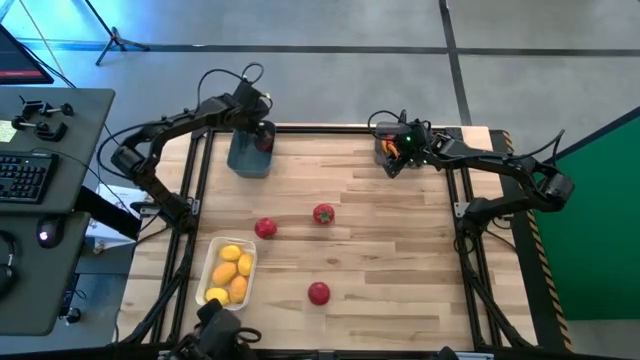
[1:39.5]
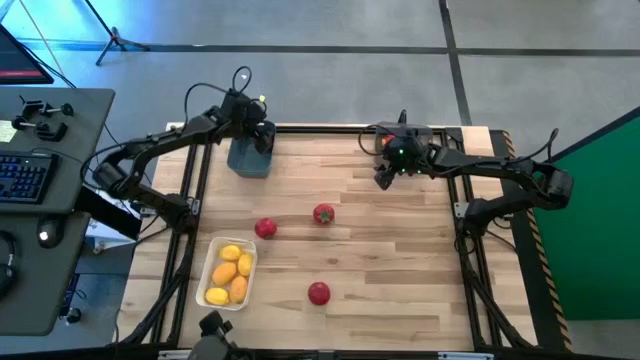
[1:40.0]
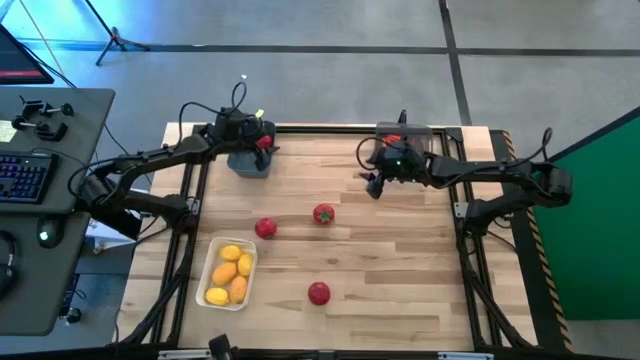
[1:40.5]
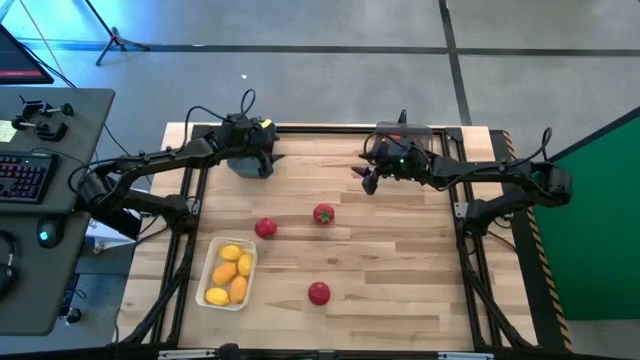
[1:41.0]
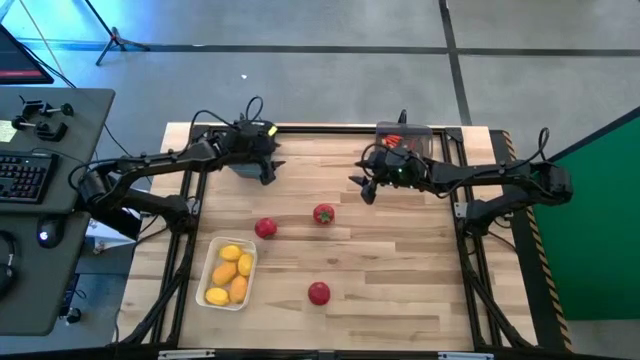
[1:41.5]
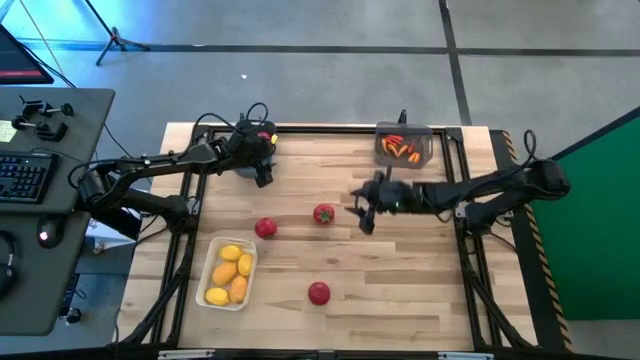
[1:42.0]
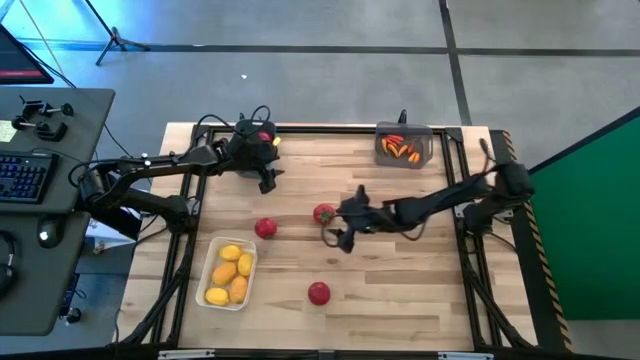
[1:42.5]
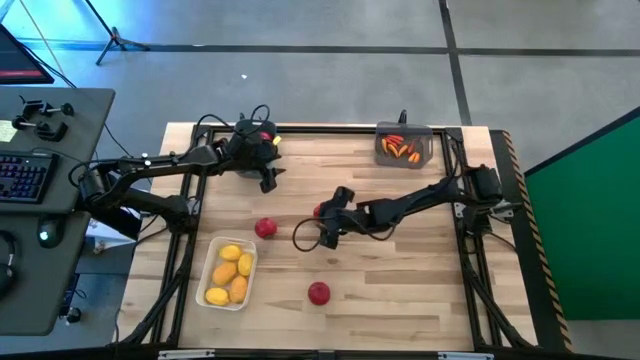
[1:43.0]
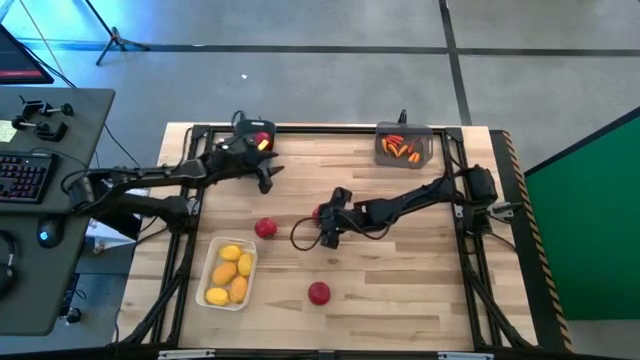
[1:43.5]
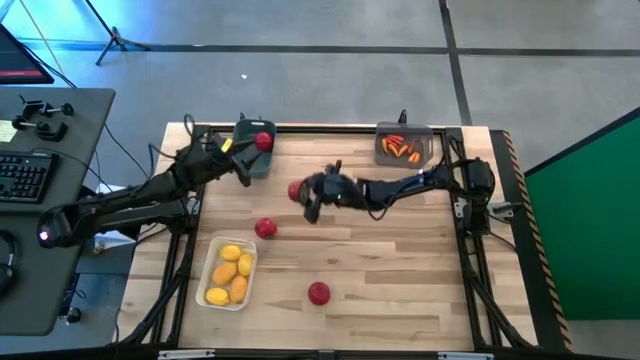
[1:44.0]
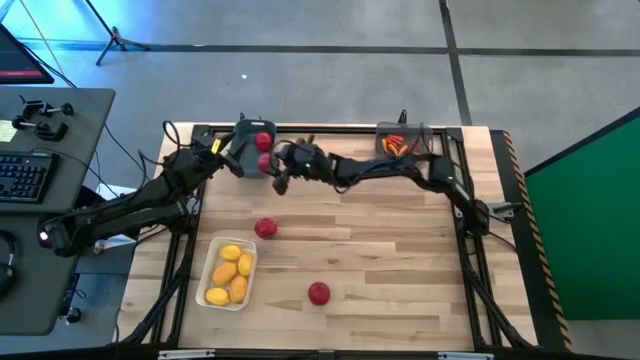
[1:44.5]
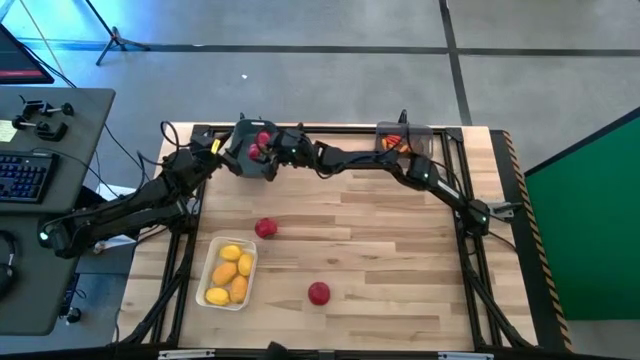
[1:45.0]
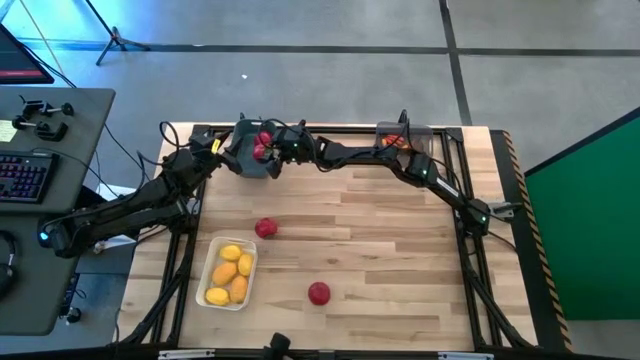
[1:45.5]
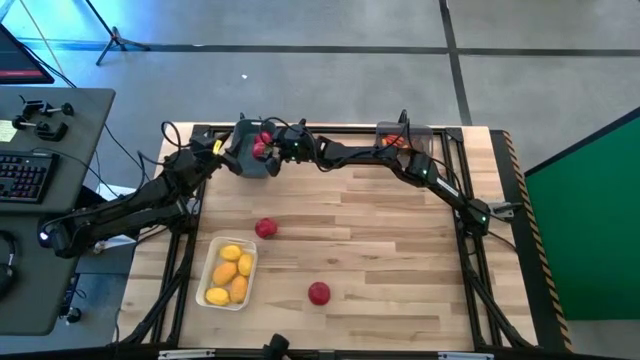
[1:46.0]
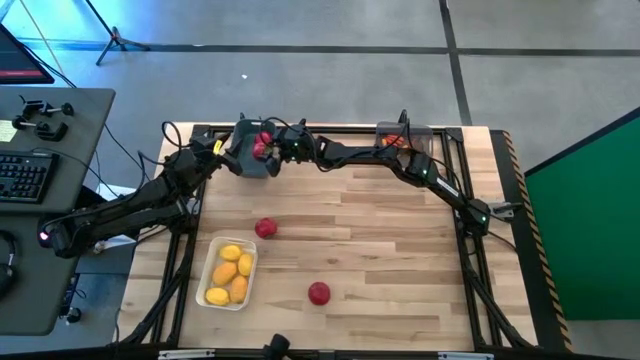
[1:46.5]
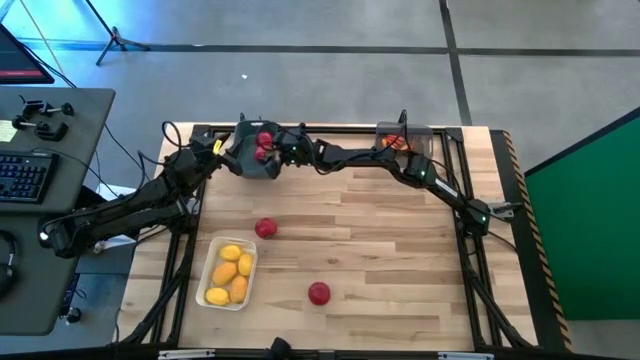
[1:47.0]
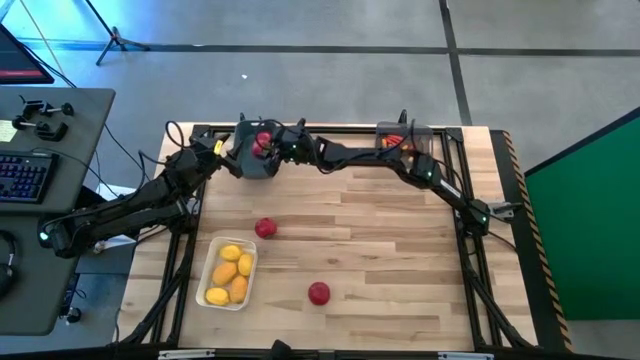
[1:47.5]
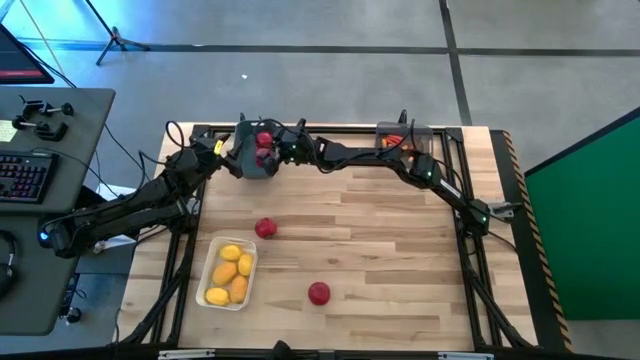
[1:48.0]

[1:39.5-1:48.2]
Task: Sort produce into baskets
Put the red tomato into the green bin

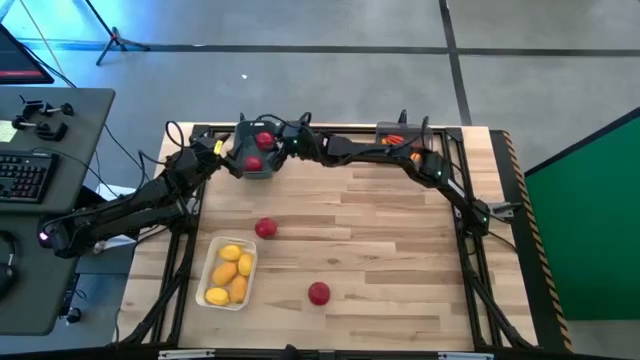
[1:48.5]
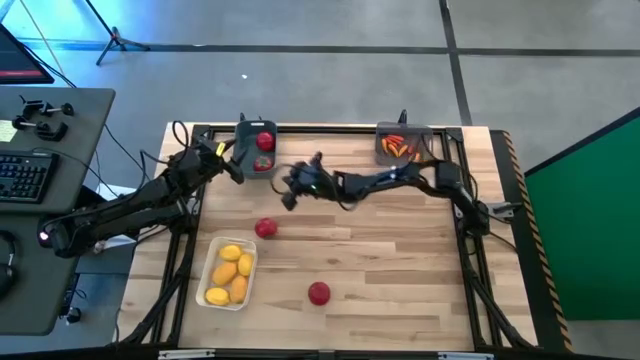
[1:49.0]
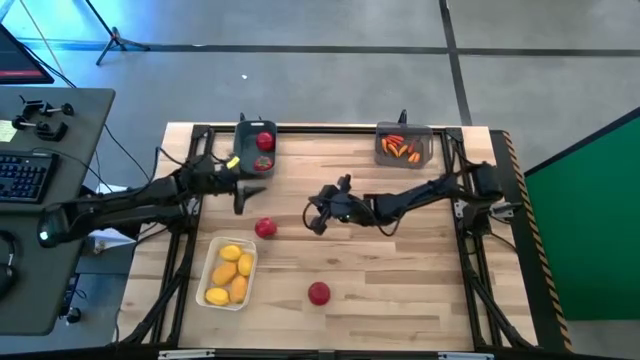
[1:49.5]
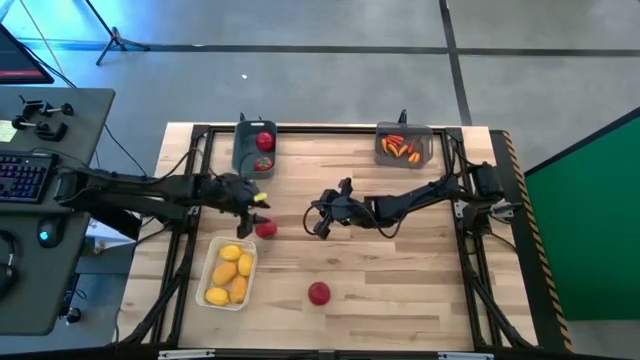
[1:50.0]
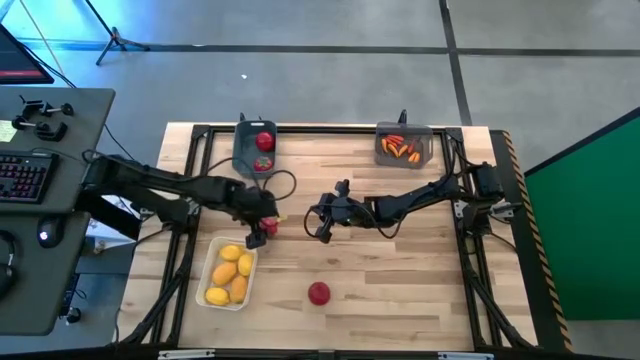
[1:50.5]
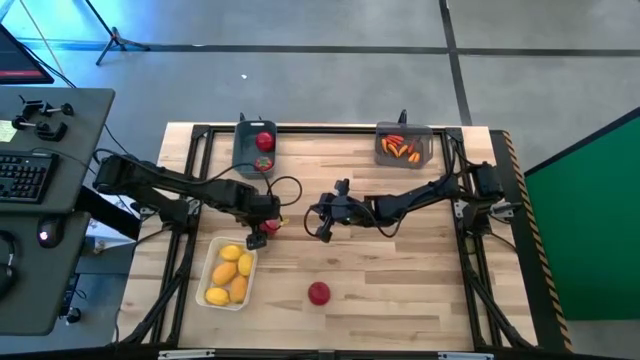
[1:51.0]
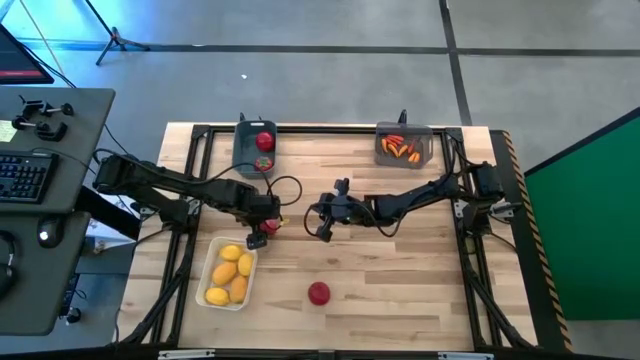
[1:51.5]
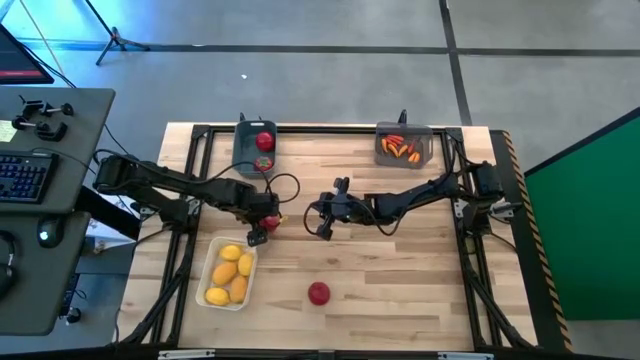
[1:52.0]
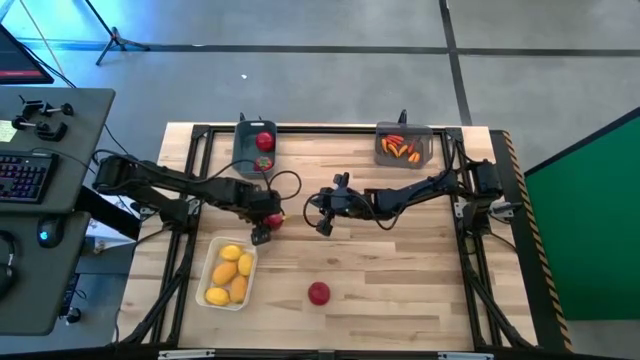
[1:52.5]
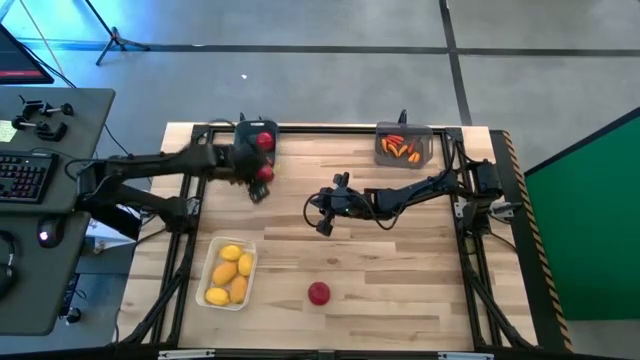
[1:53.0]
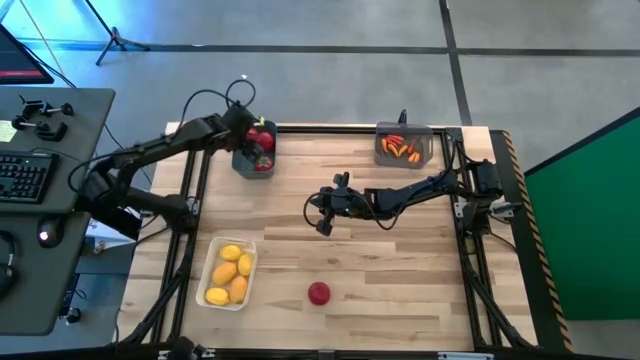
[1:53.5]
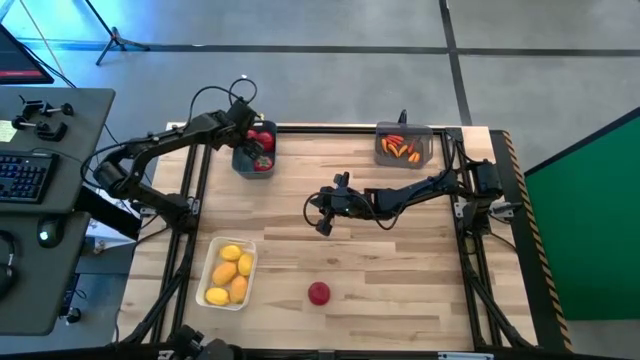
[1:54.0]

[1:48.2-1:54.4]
Put the red tomato into the green bin

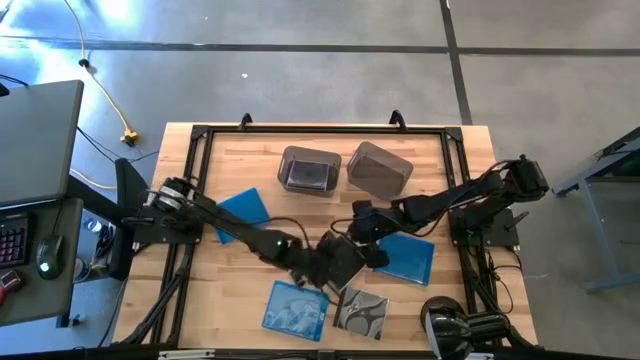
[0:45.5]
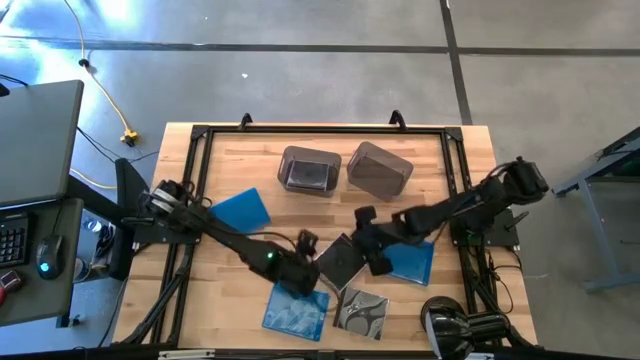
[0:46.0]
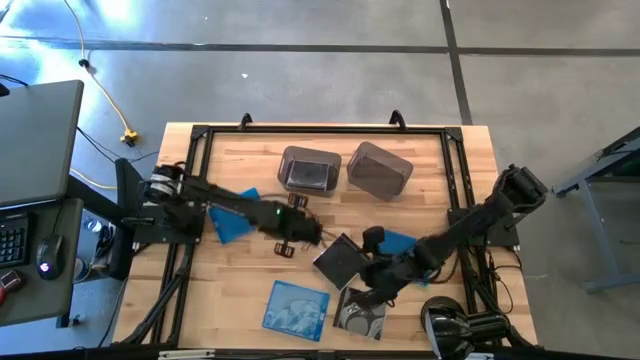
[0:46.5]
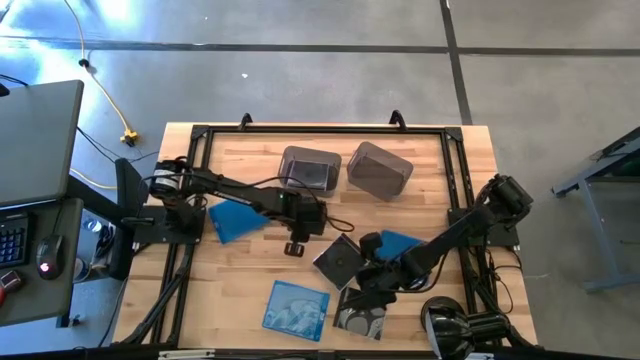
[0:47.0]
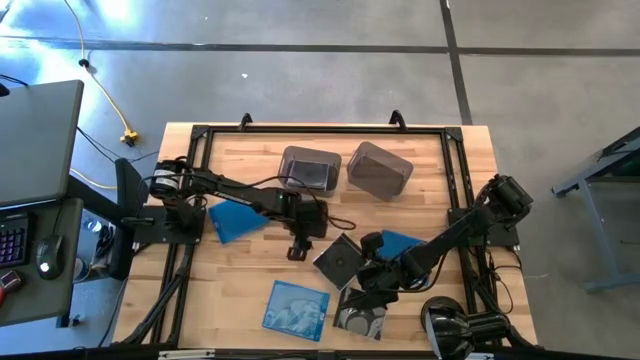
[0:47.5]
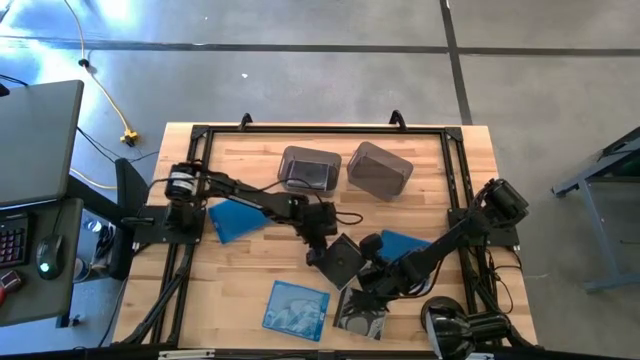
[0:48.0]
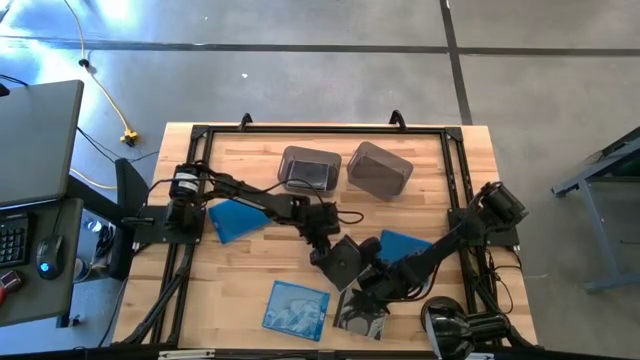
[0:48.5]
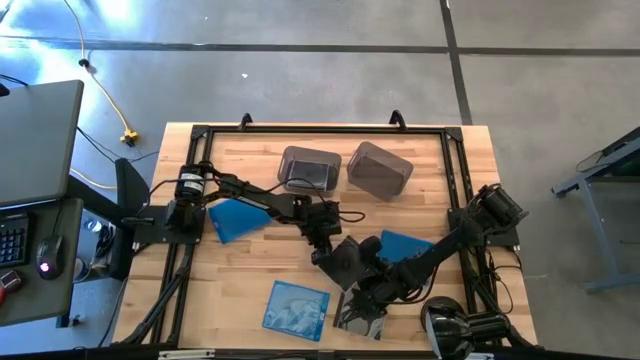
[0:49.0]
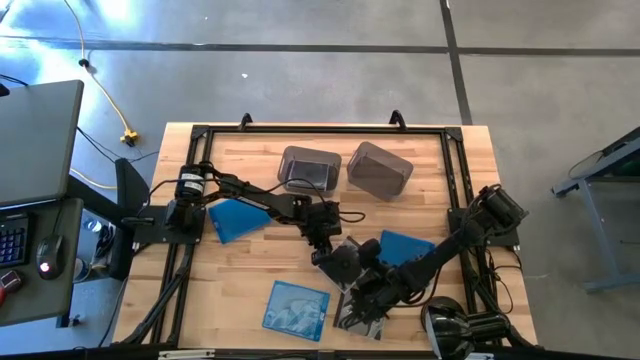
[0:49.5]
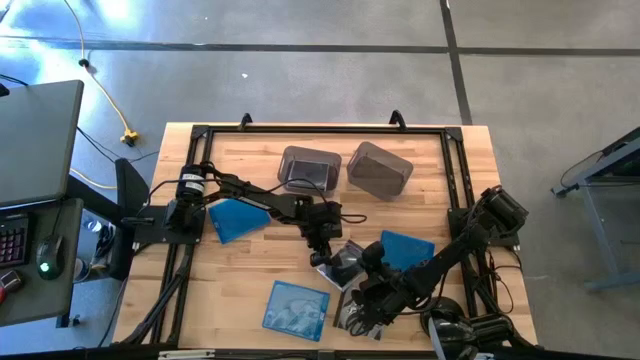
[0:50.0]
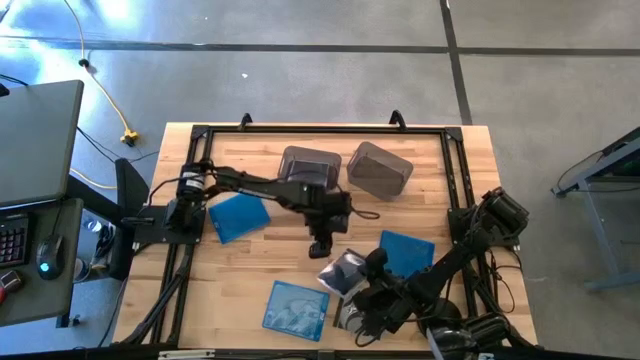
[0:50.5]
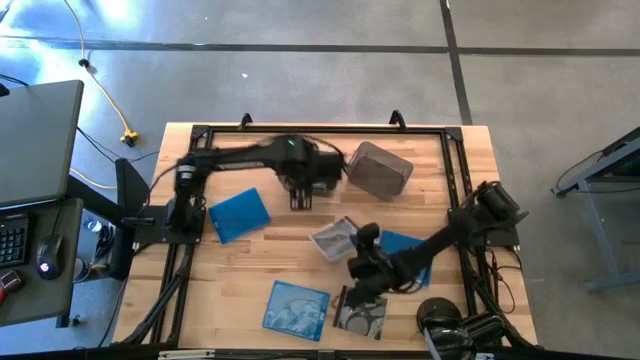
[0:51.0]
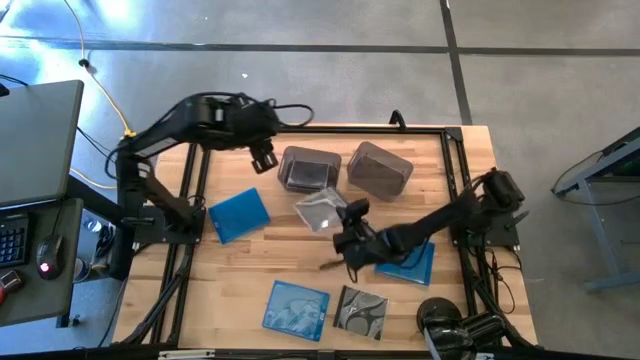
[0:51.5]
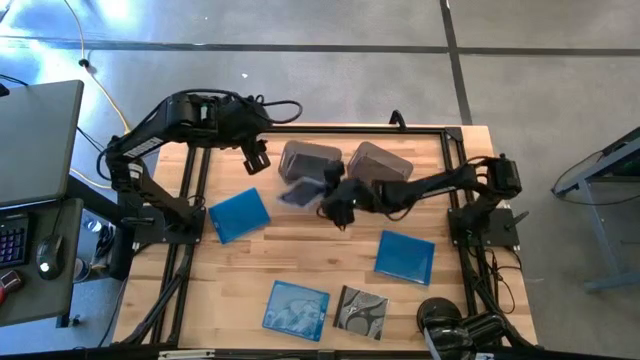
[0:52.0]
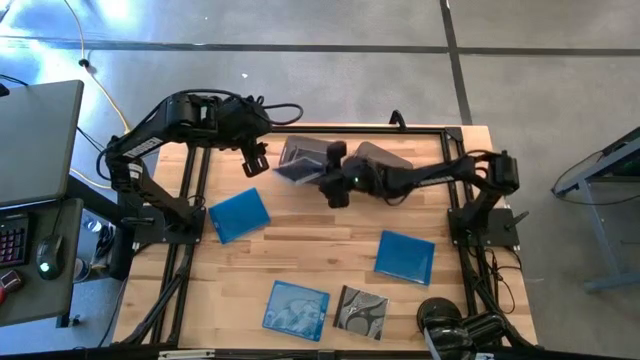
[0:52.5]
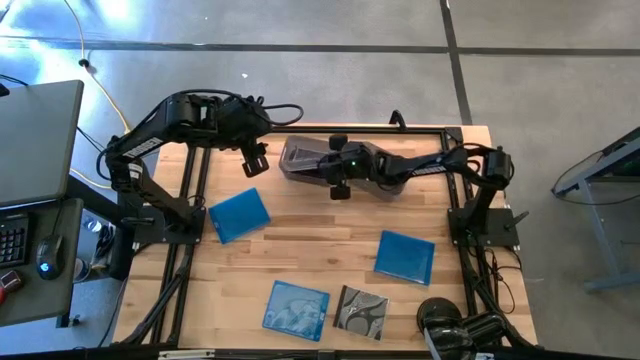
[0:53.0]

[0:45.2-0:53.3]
Task: Pick & place jewel cases by type
Put the top black CD case into the left black bin
